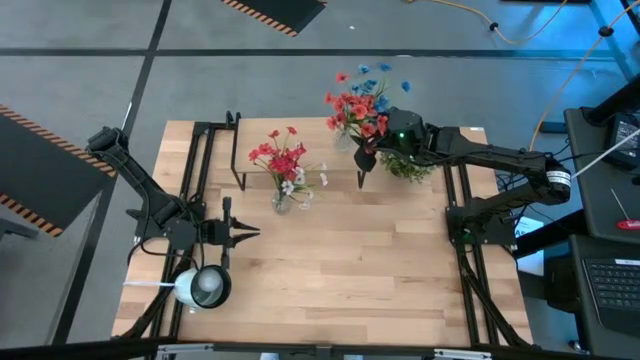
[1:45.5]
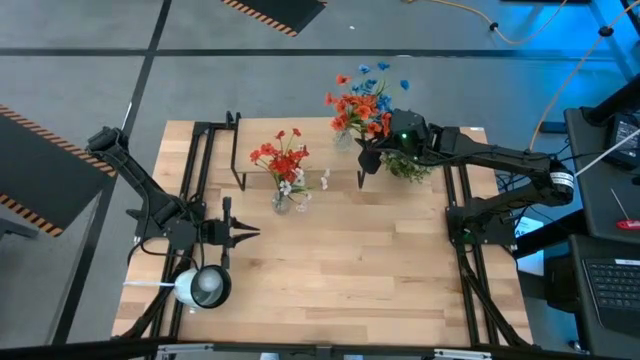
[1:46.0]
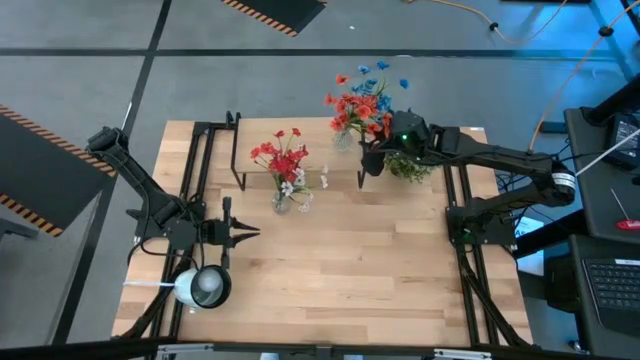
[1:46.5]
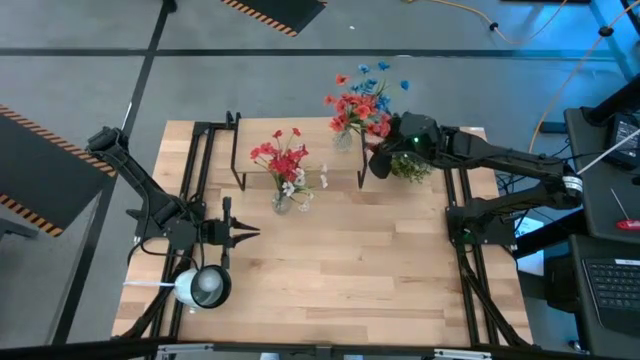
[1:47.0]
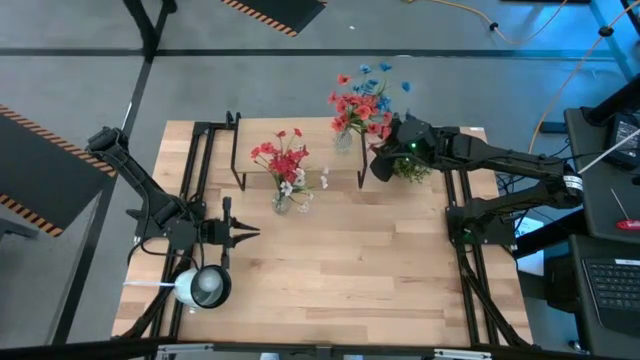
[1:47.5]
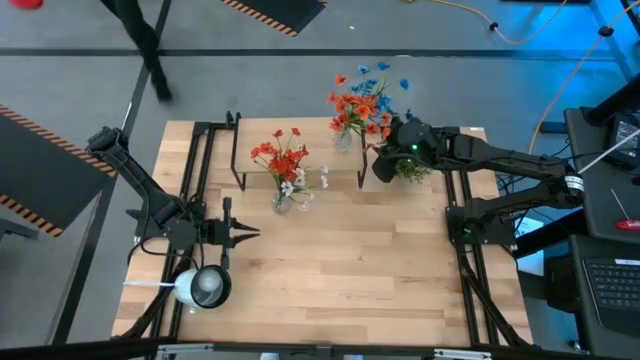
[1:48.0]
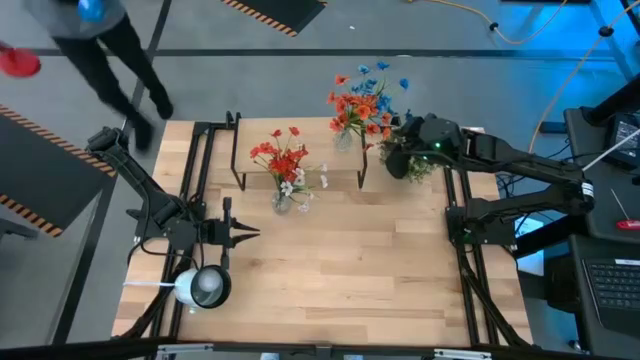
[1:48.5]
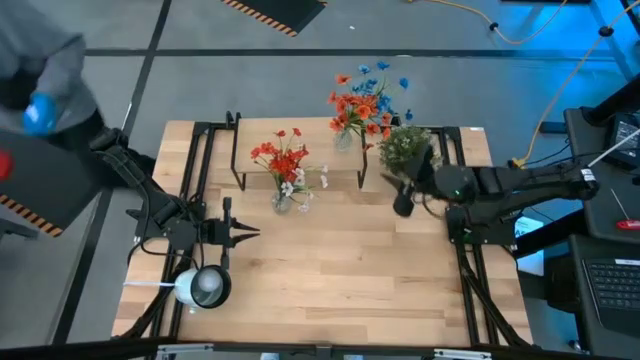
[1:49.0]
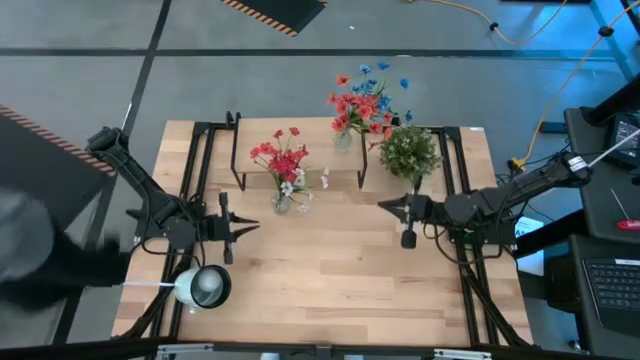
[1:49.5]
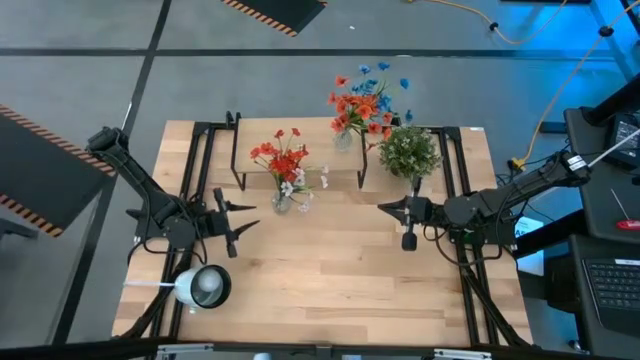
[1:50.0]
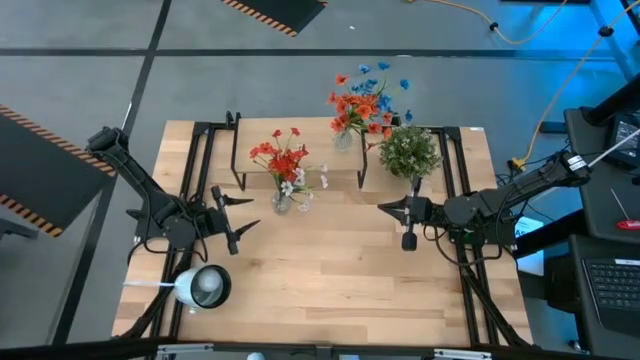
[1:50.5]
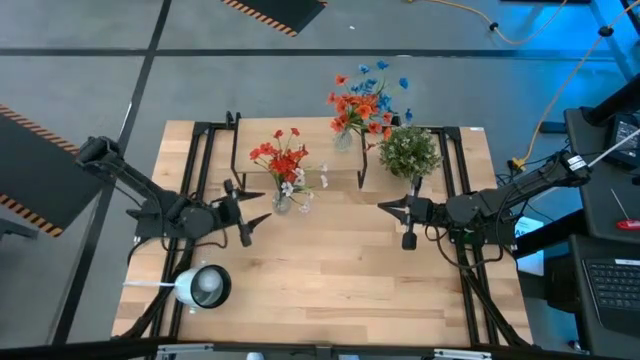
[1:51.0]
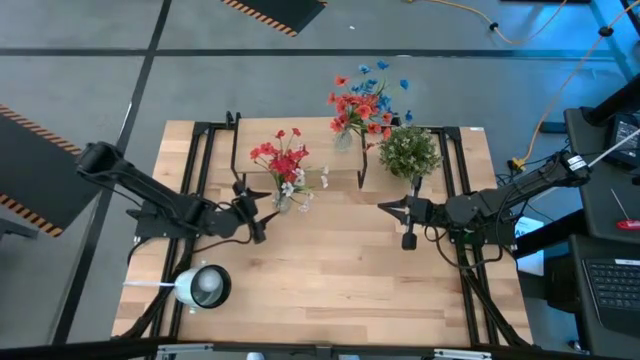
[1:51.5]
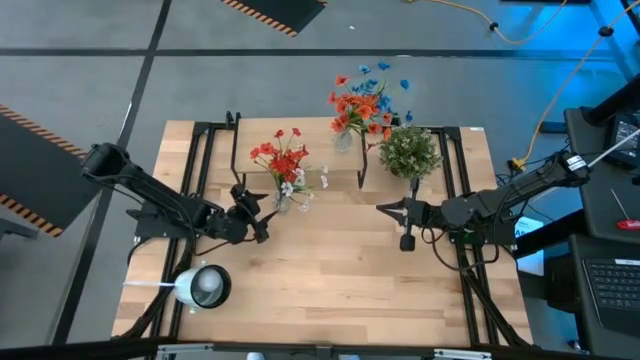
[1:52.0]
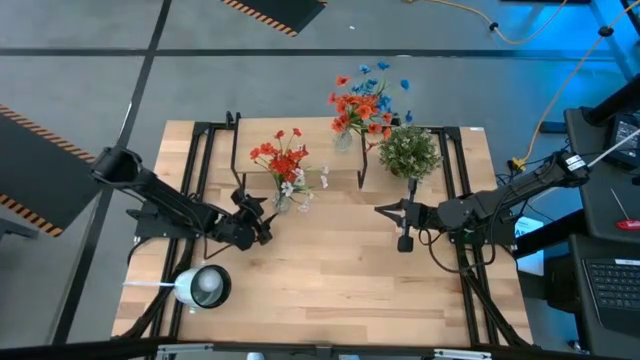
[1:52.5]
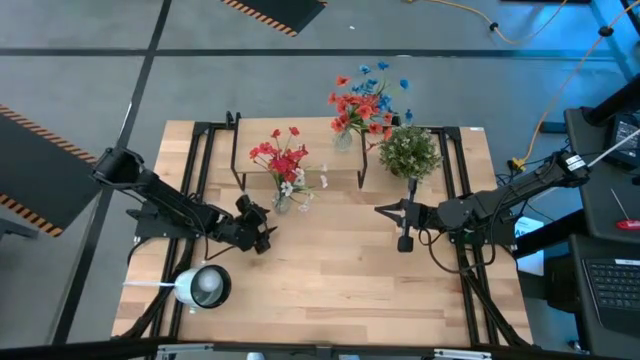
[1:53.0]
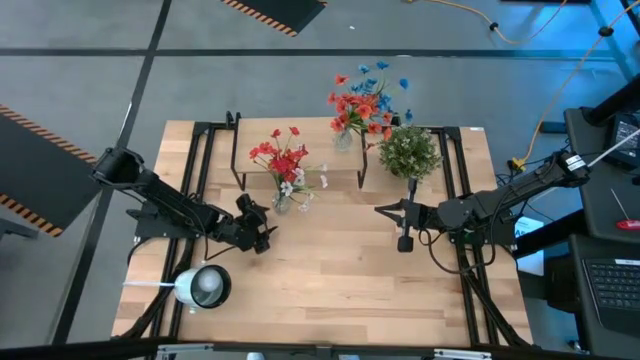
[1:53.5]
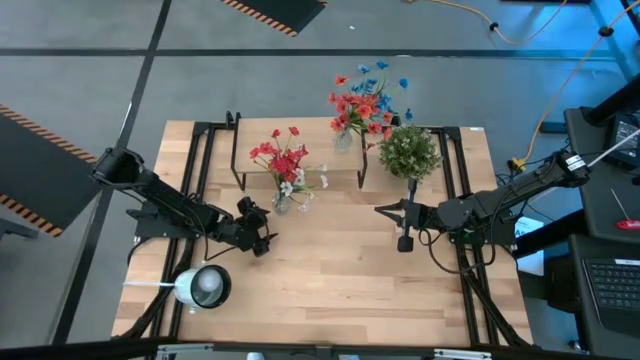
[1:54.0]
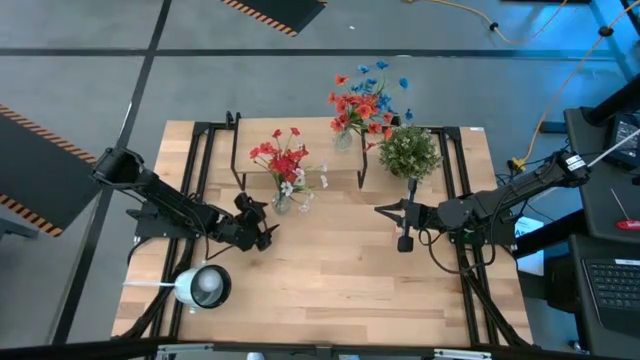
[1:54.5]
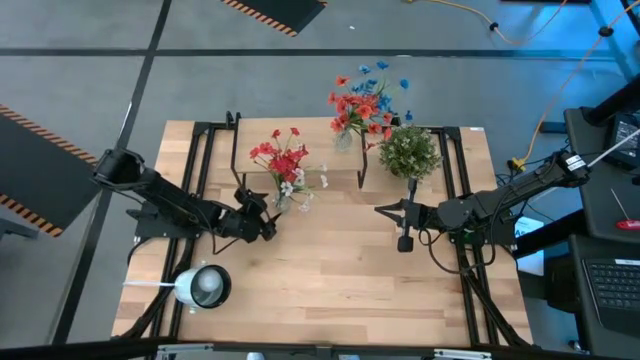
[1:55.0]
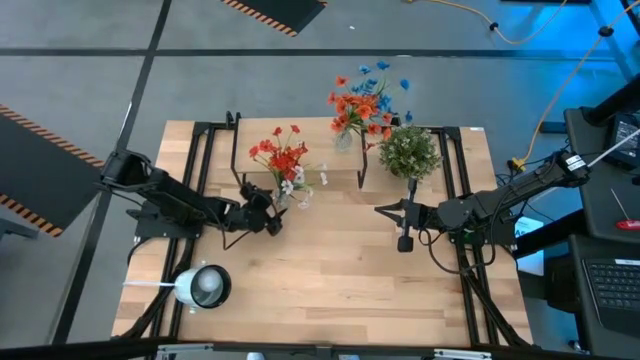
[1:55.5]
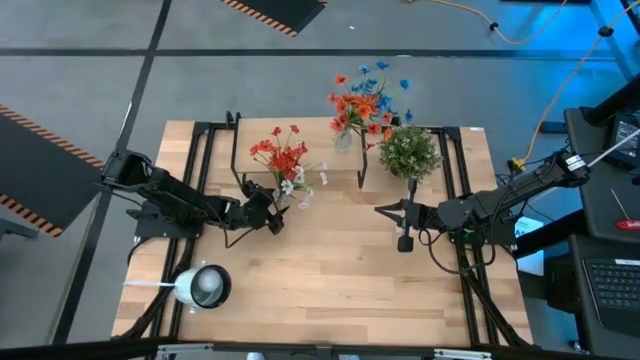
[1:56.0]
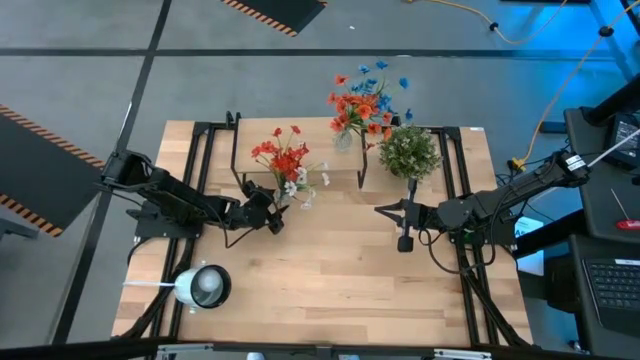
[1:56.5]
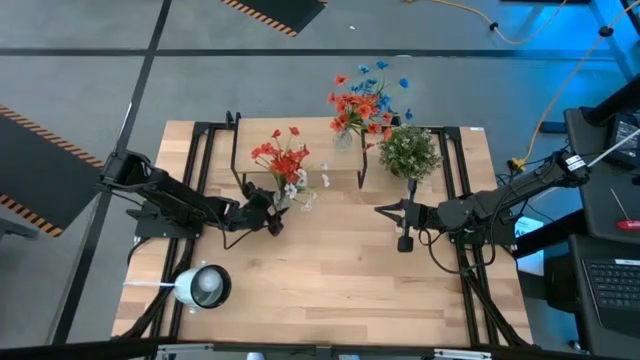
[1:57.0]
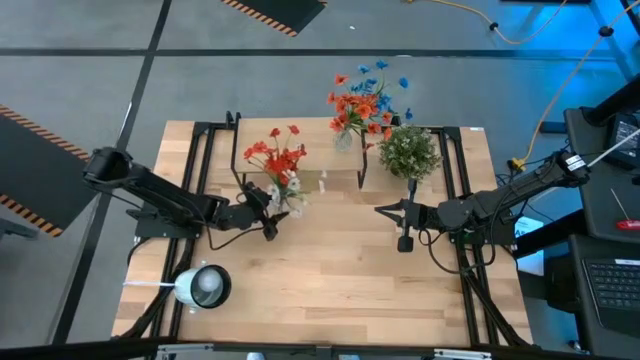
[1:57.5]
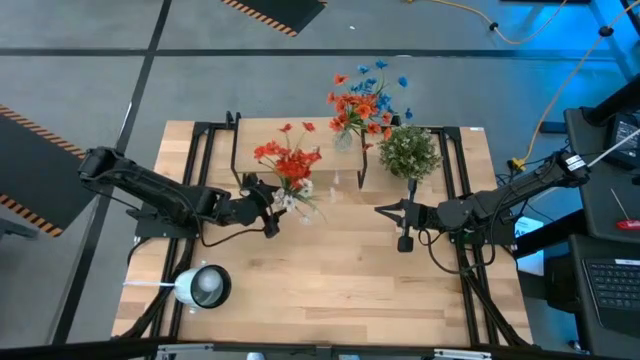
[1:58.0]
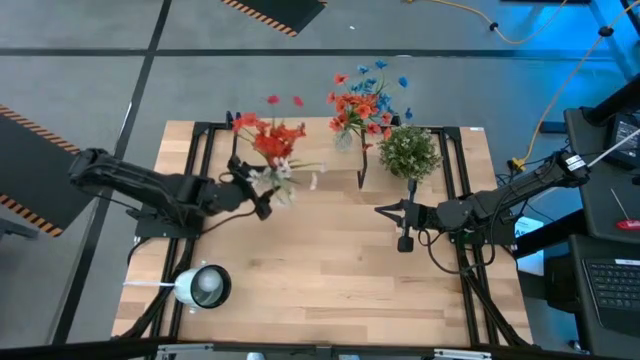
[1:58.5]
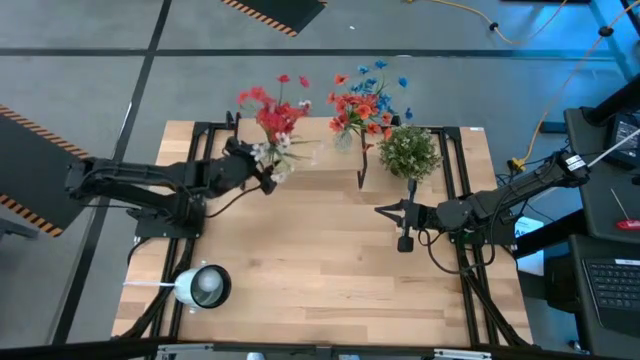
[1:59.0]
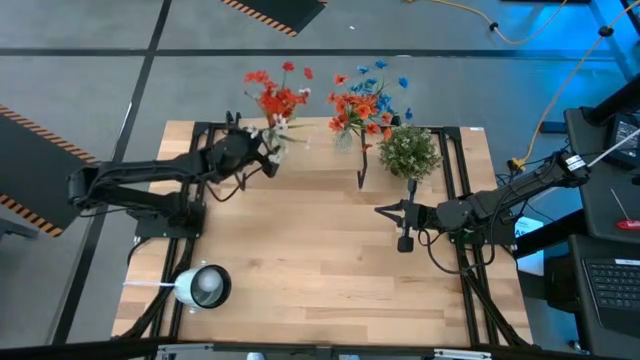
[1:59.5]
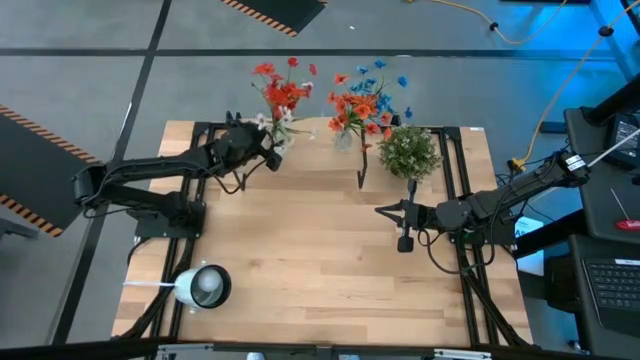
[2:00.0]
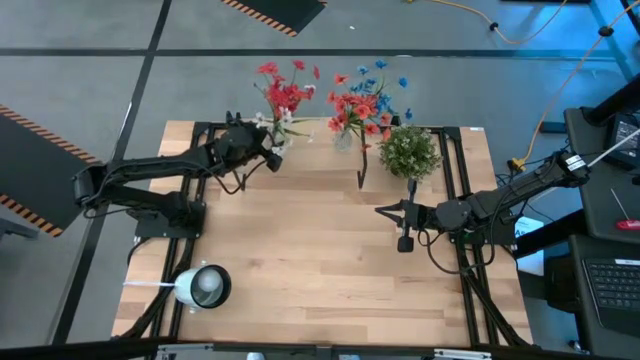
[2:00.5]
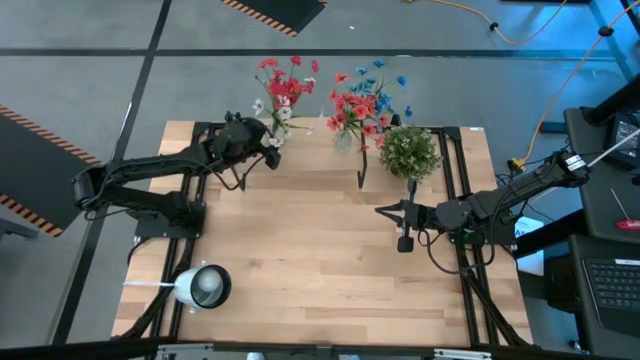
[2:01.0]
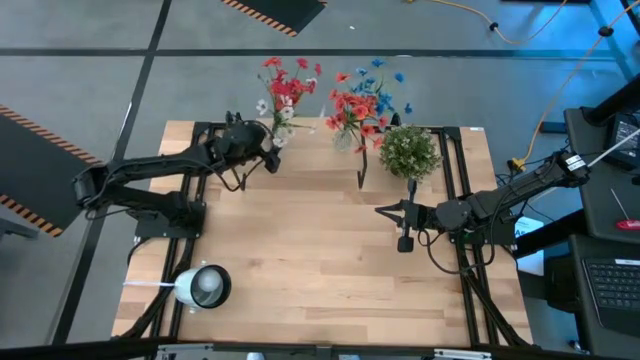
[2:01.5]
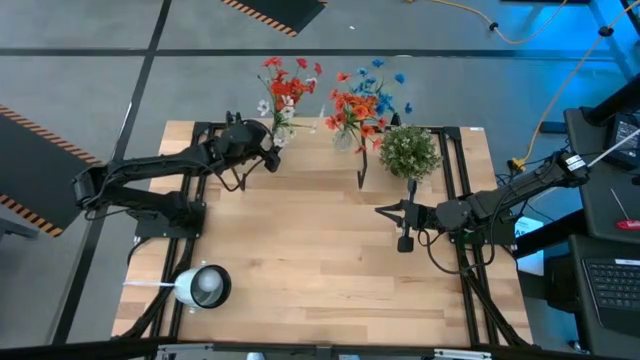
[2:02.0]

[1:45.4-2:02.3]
Task: Pick and place flowers into a vace then onto a shelf
Put the left transparent vase on the shelf

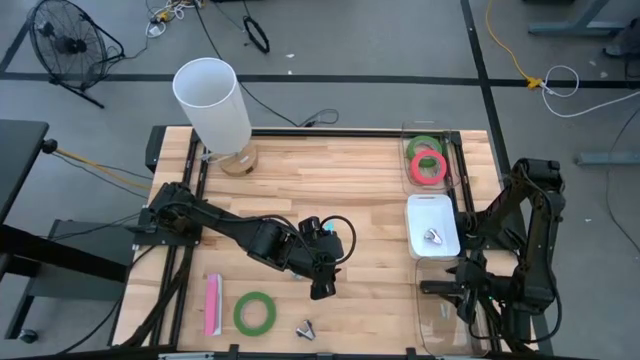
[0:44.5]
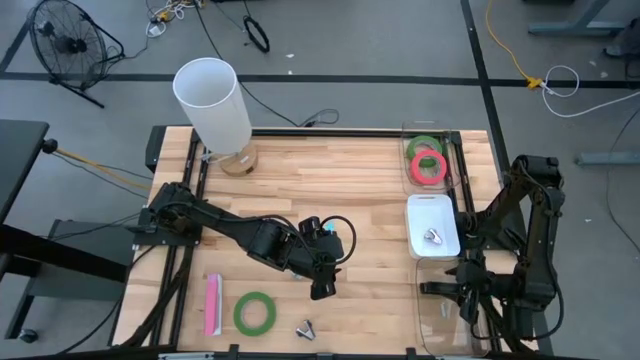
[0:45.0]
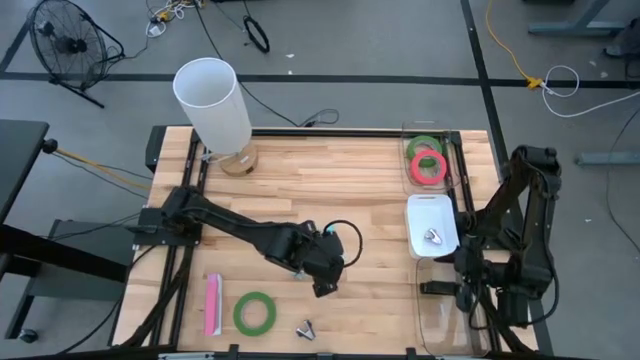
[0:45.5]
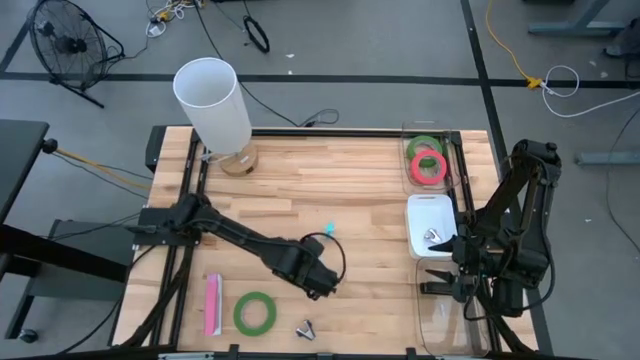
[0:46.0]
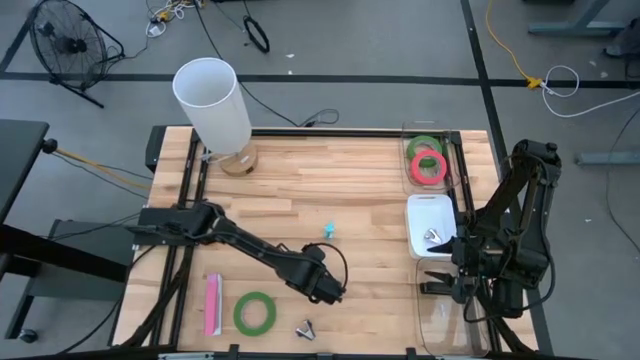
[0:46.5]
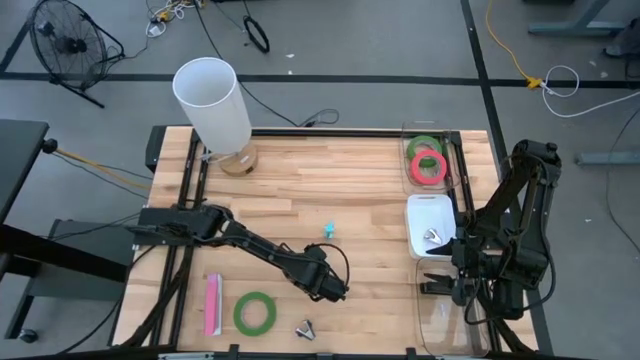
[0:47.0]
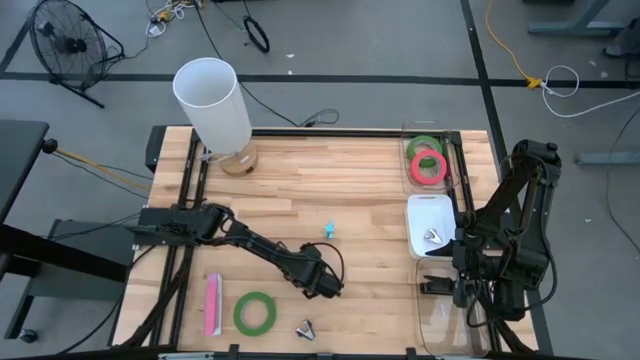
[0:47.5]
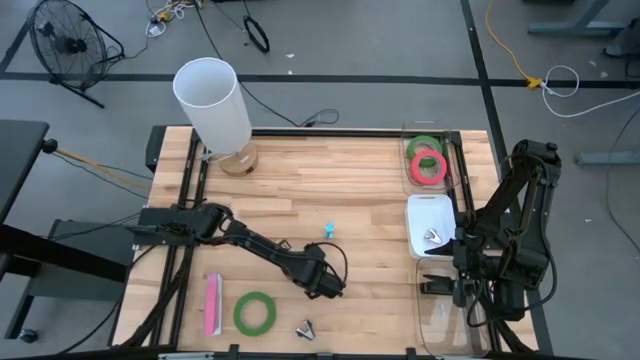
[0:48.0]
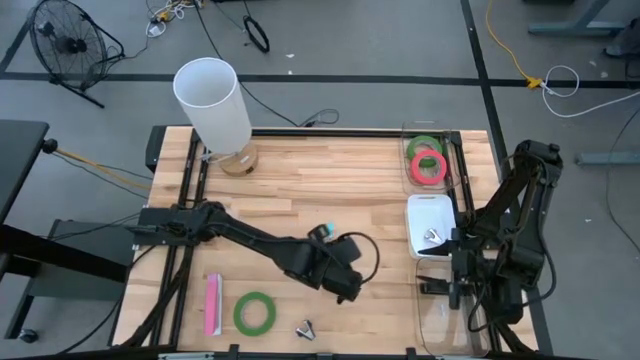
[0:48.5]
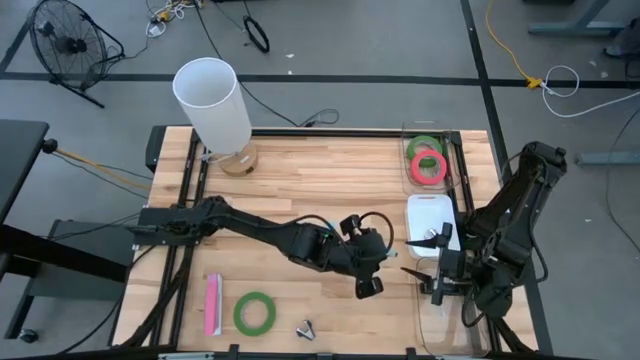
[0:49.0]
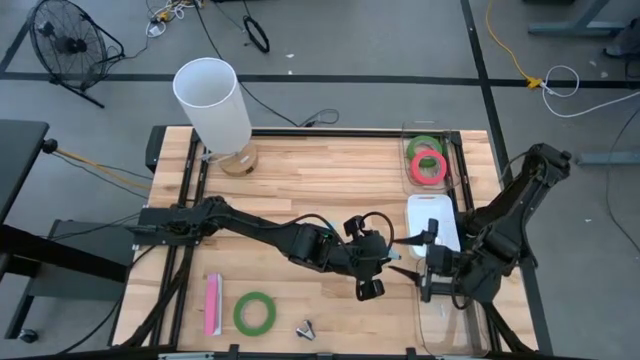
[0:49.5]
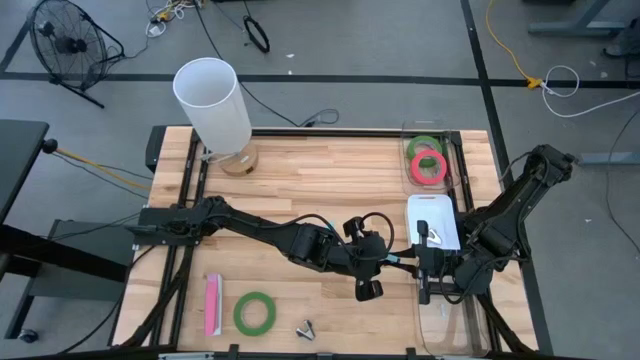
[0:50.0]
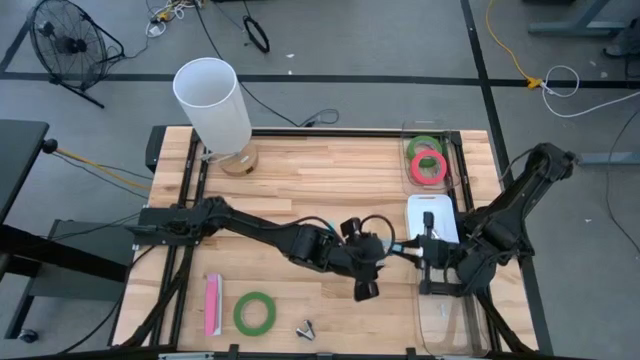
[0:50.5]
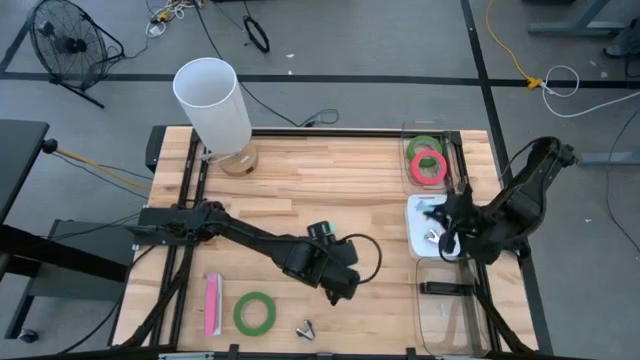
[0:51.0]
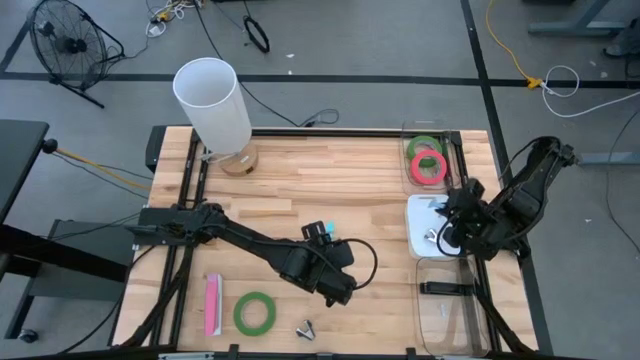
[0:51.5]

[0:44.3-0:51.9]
Task: Pick and place Stapler, Stapler remover, tape
Put the blue stapler remover into the white bin
